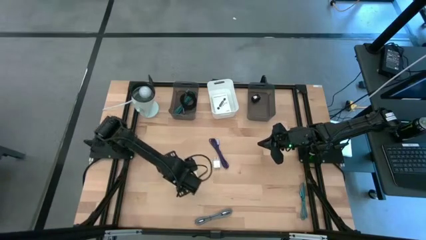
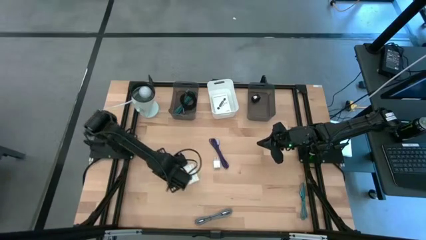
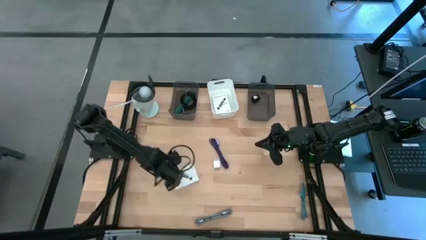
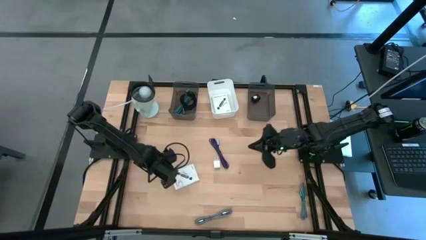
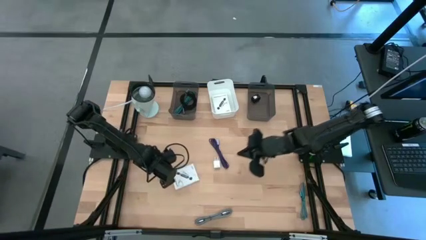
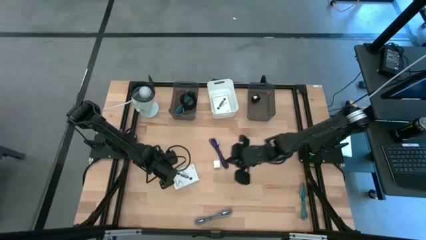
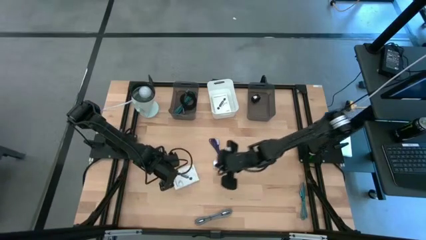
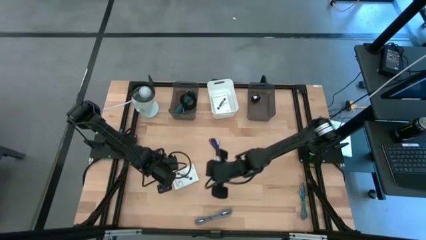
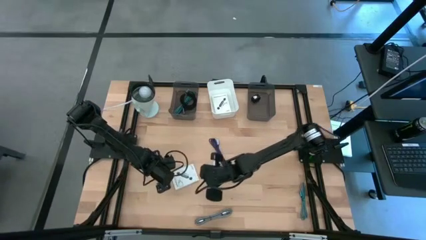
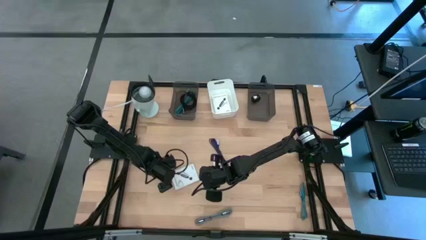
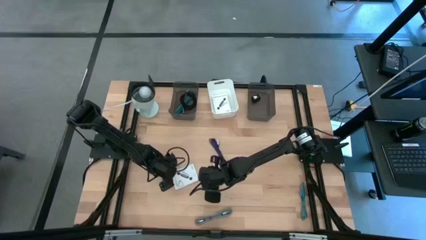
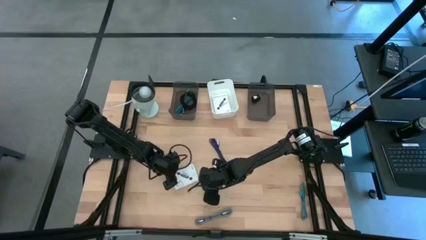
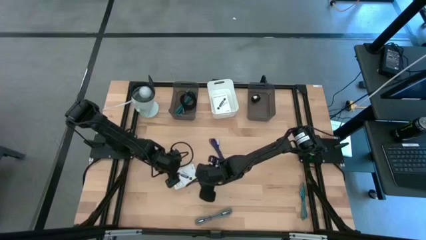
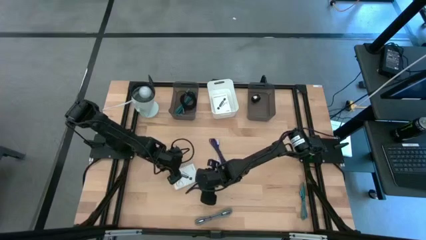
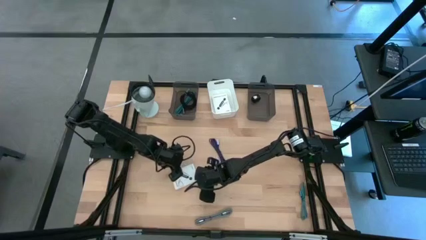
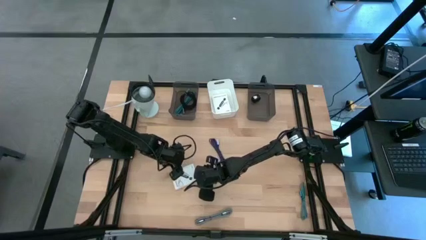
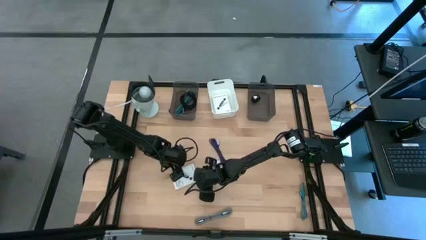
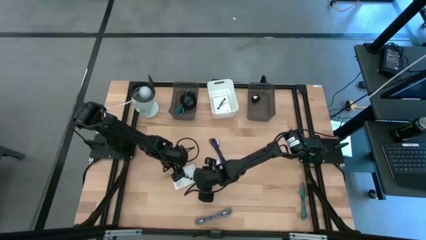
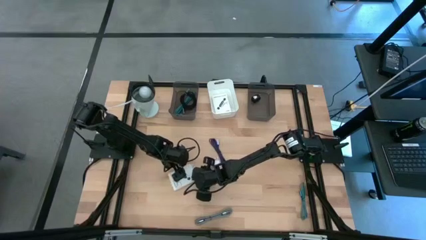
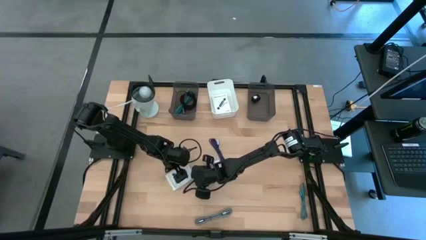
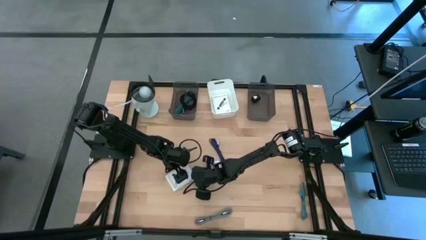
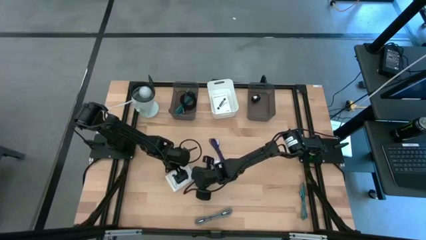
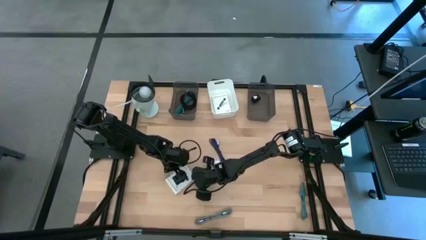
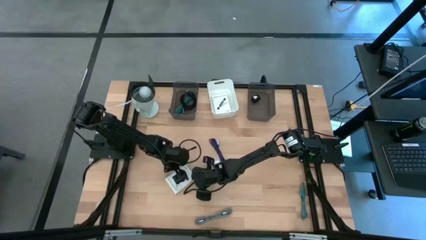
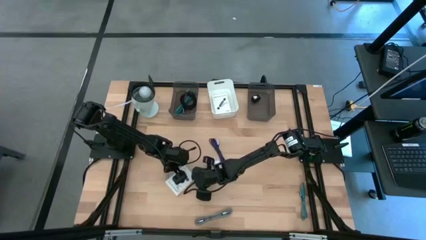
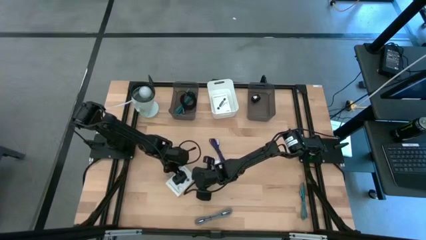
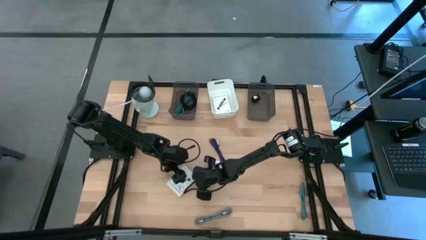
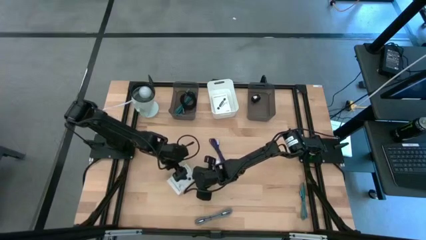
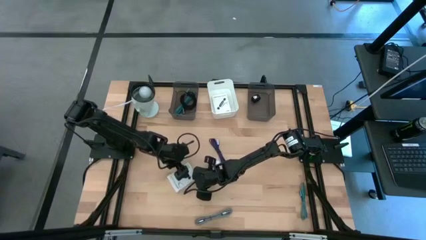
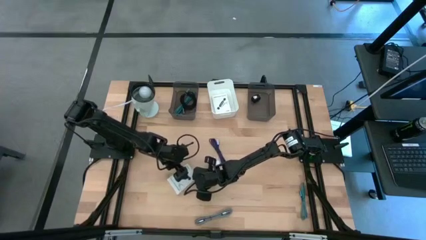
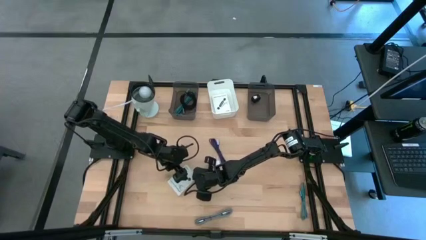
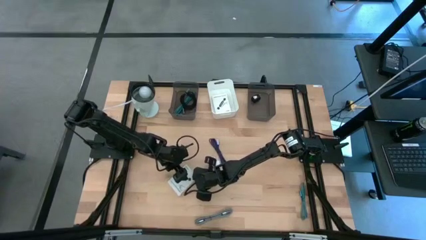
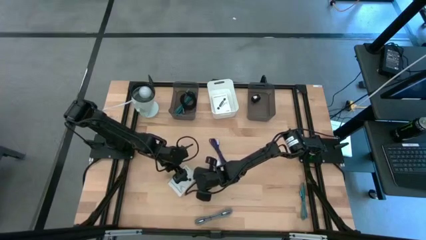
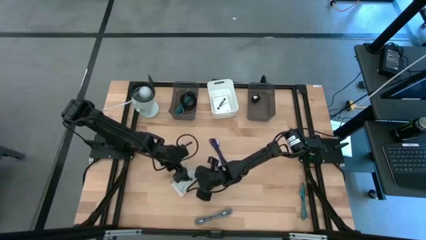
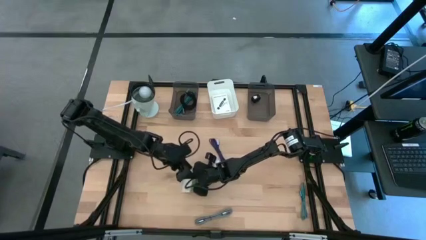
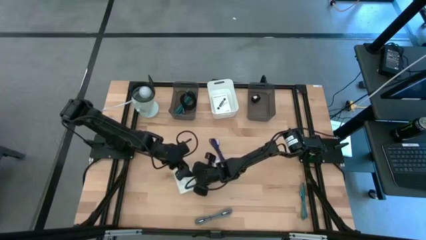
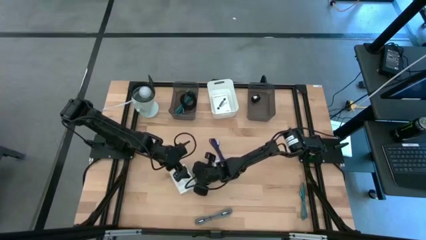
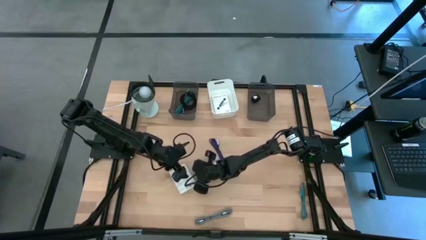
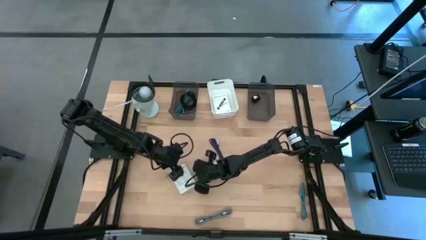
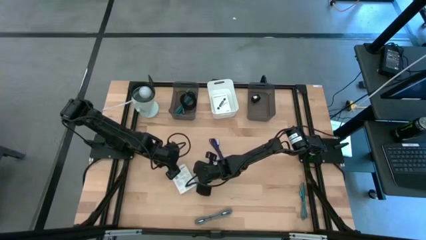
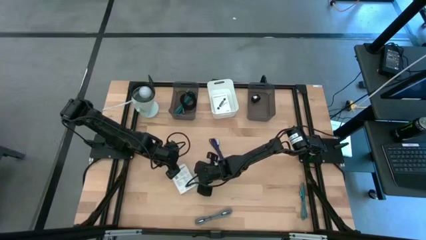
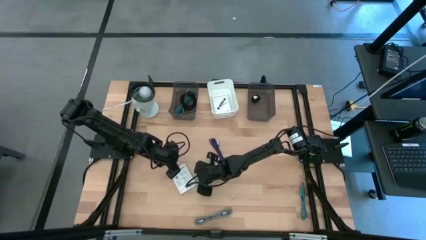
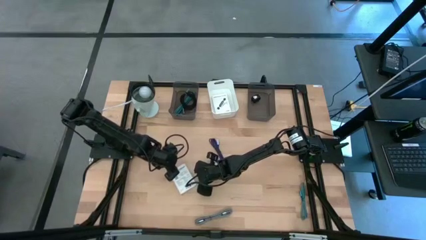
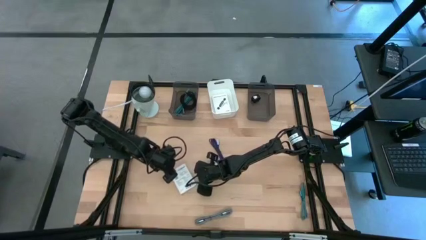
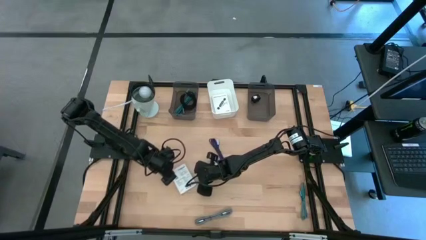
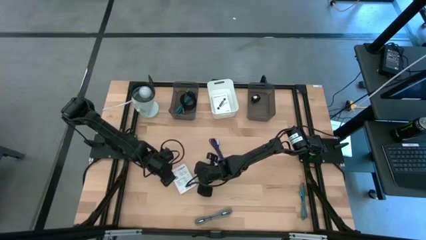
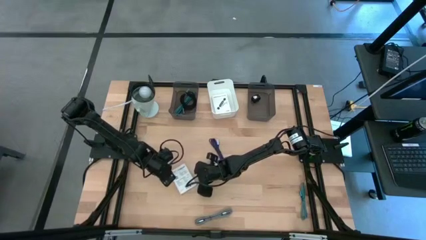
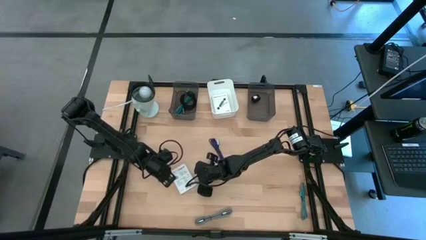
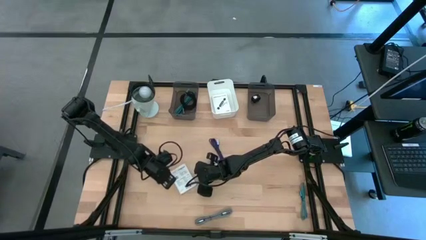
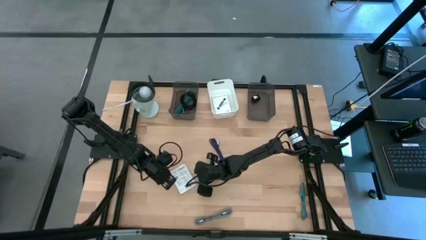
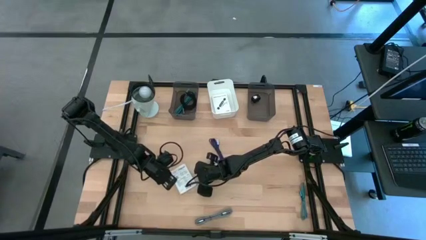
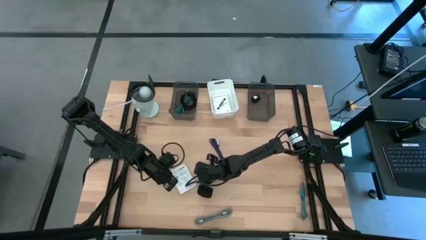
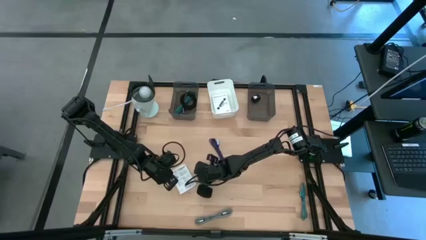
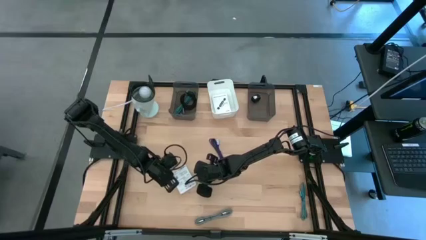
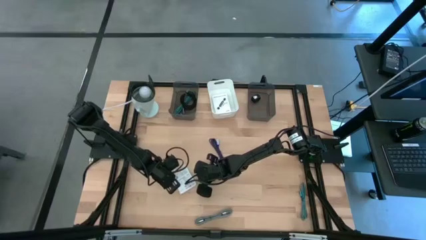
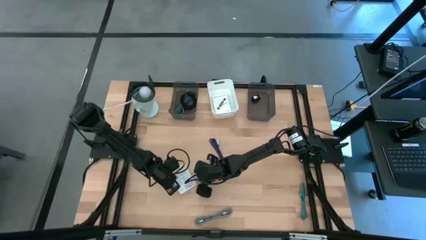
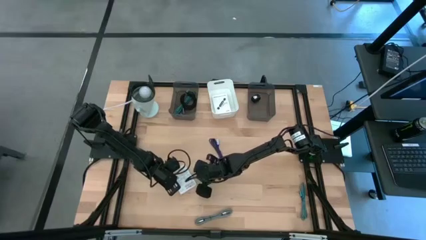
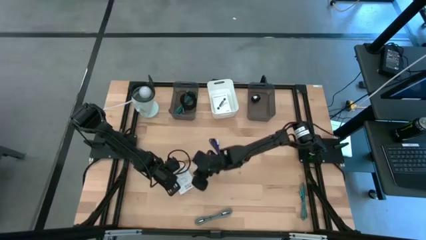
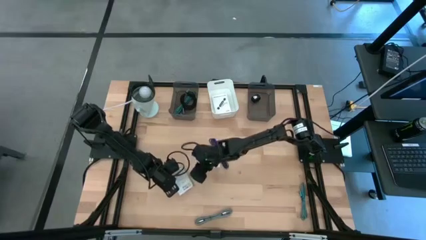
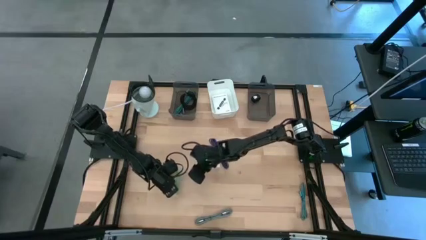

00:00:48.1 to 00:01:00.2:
Task: Pick and place items into bin
Put the white card reader box into the white bin

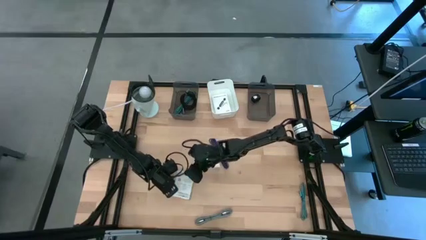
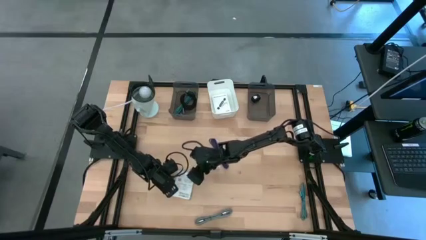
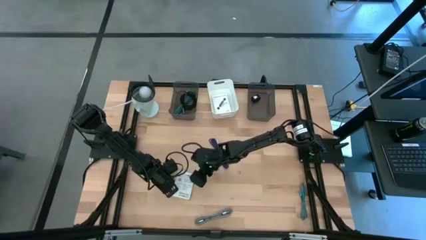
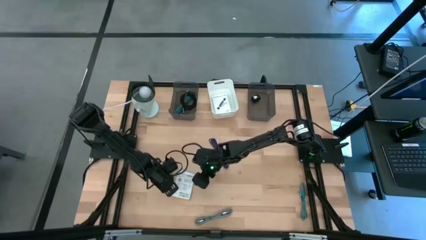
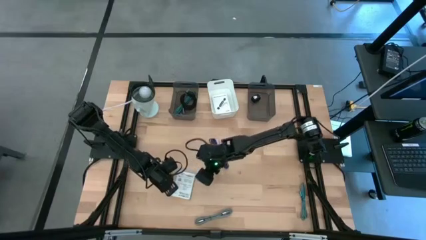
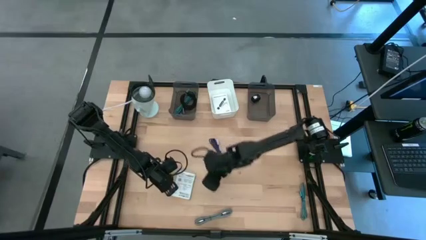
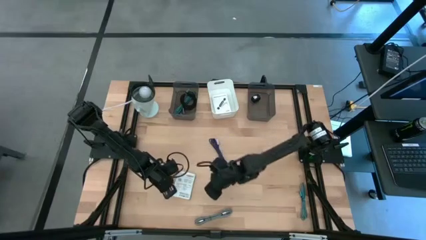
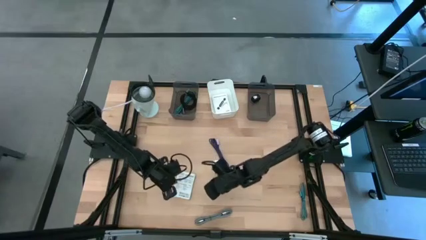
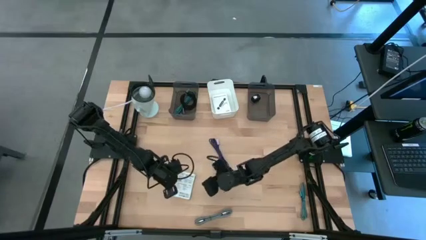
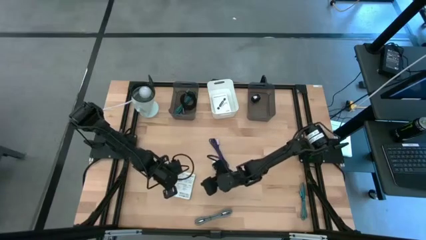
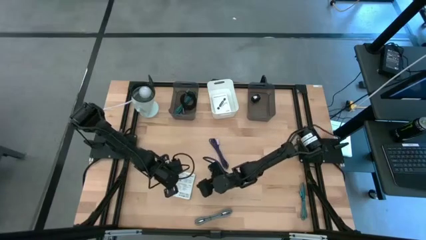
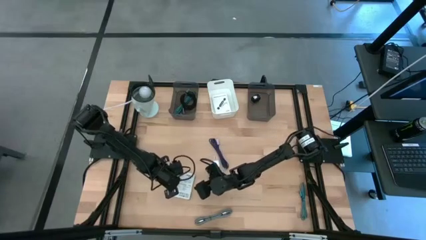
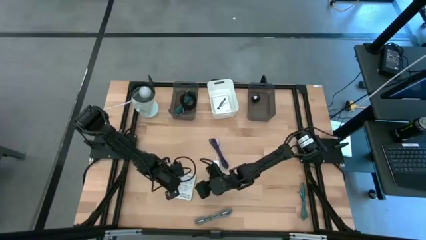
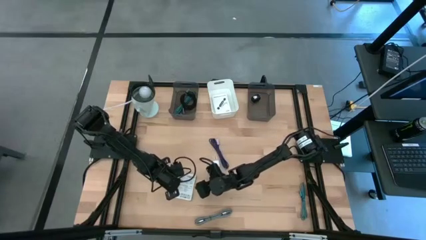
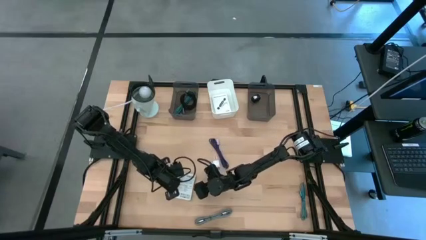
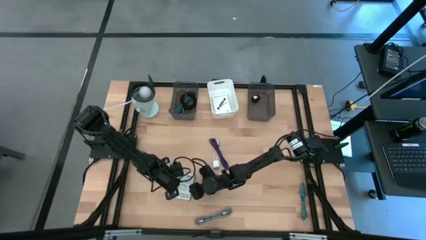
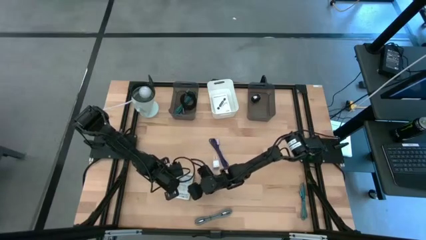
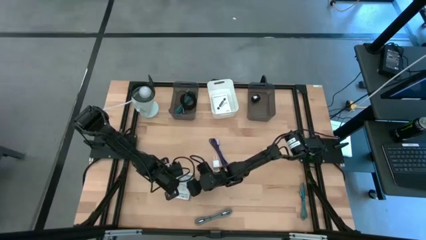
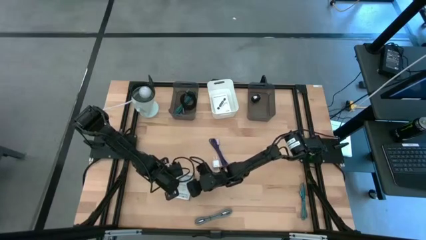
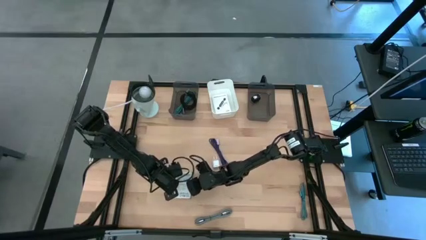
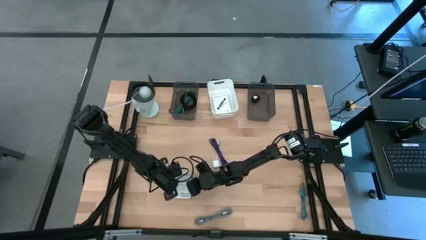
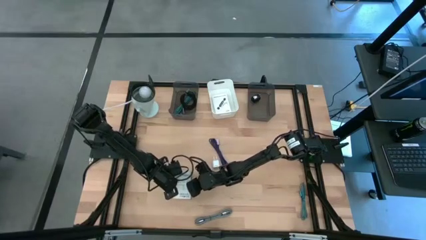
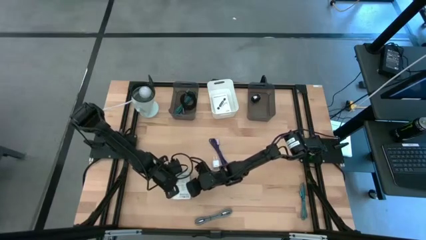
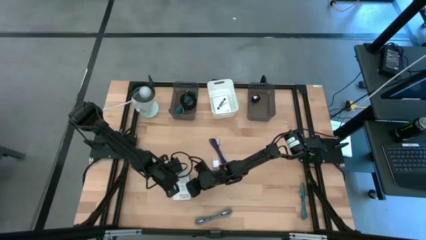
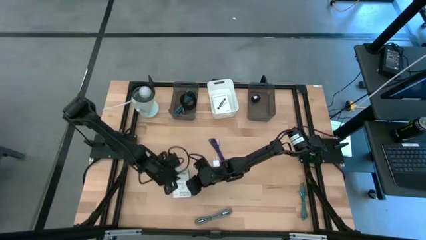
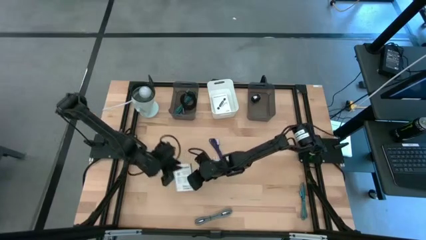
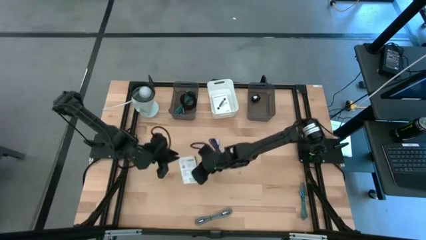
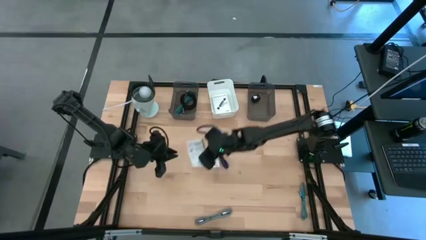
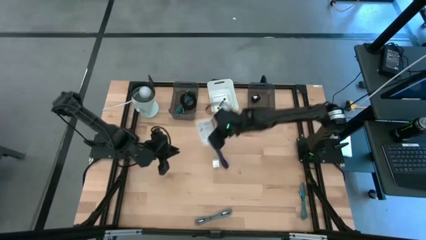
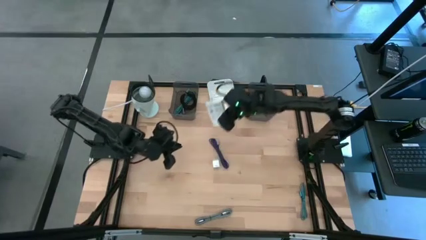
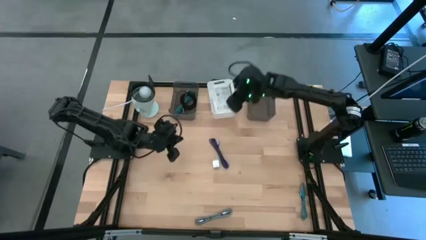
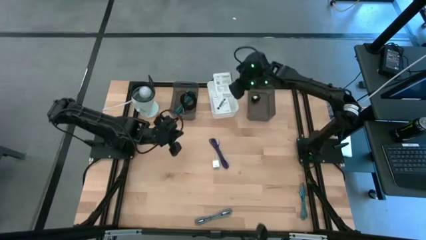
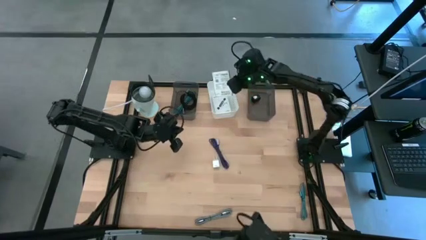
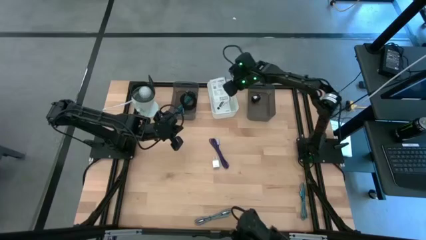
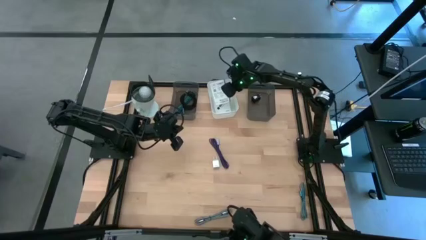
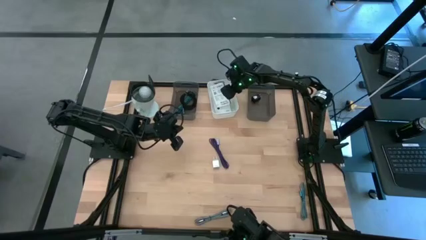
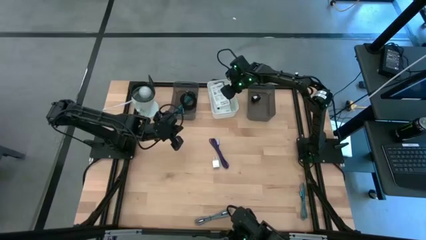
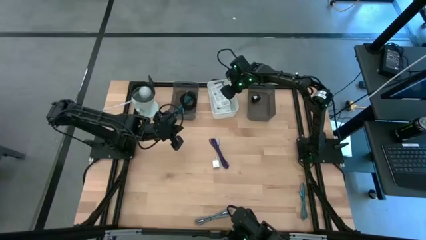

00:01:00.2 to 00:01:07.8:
Put the white card reader box into the white bin
